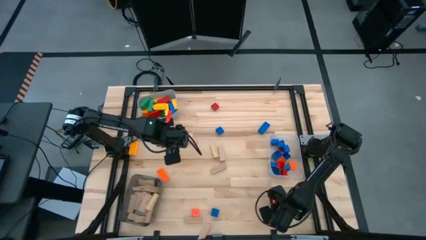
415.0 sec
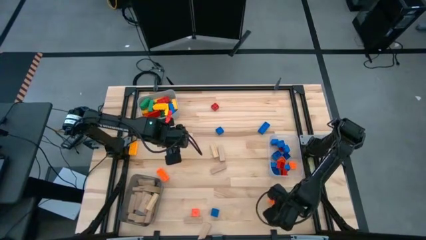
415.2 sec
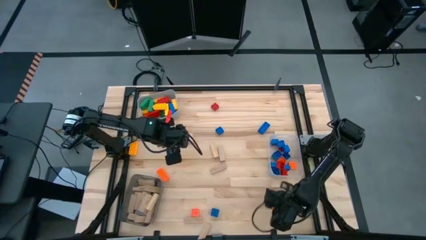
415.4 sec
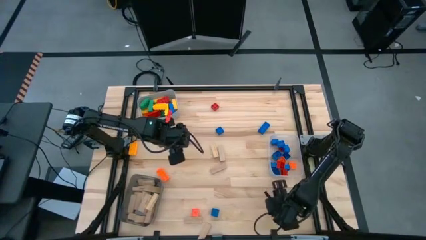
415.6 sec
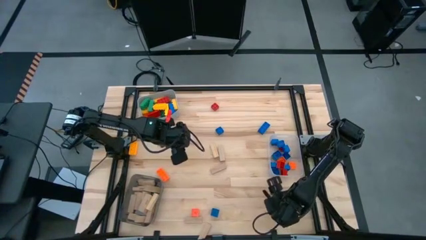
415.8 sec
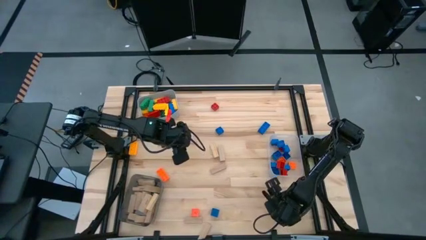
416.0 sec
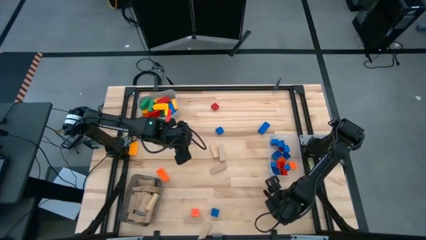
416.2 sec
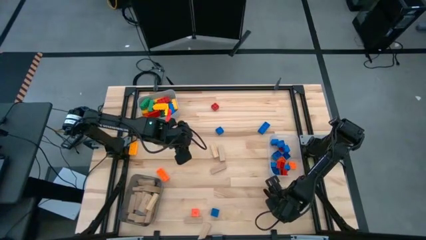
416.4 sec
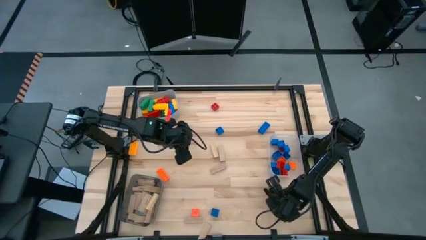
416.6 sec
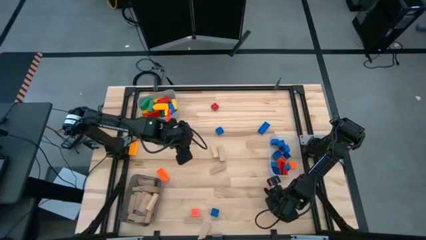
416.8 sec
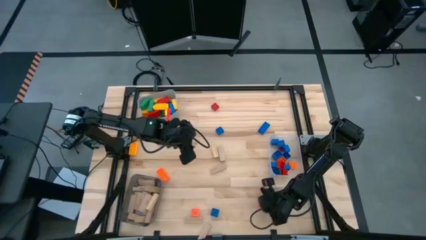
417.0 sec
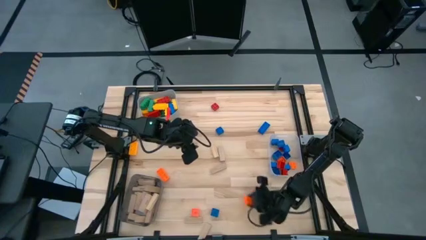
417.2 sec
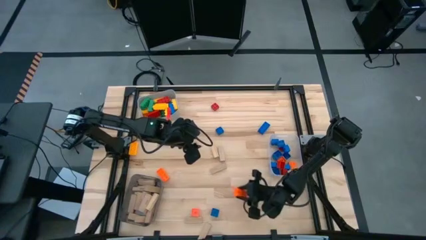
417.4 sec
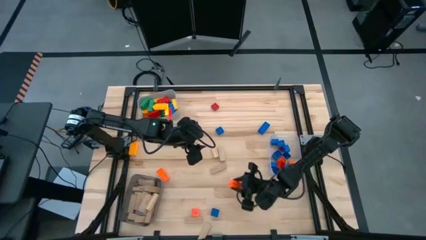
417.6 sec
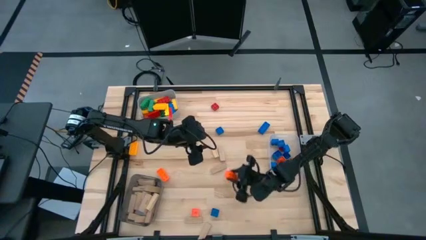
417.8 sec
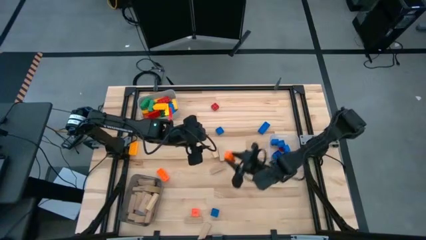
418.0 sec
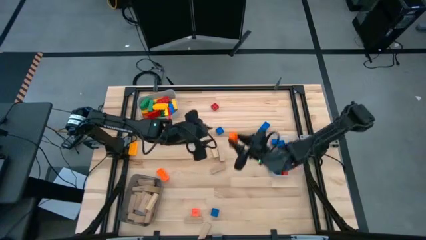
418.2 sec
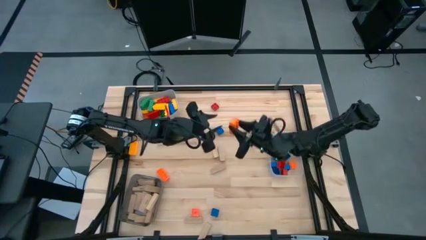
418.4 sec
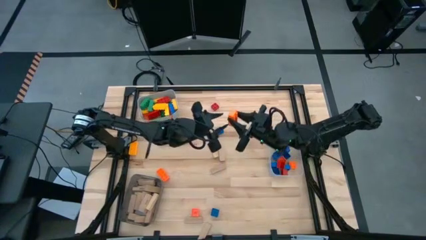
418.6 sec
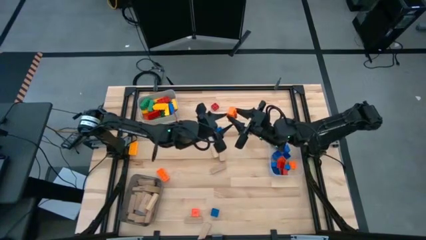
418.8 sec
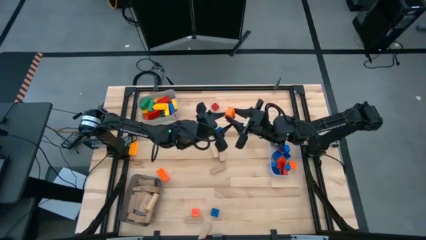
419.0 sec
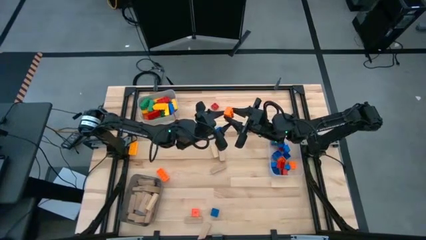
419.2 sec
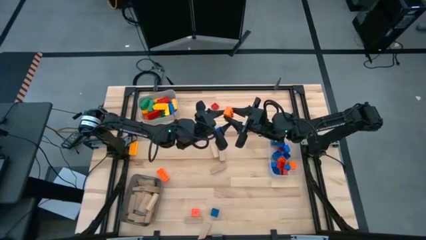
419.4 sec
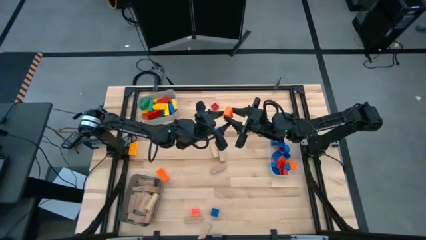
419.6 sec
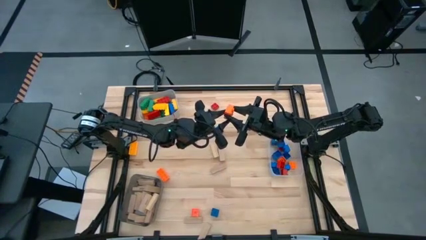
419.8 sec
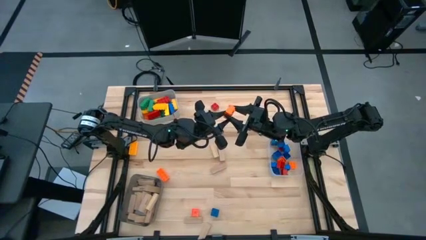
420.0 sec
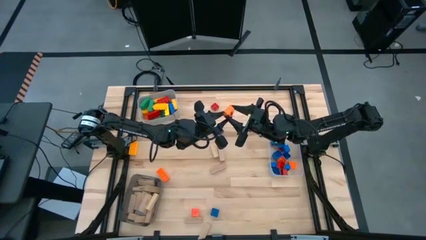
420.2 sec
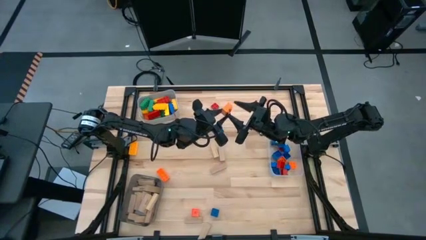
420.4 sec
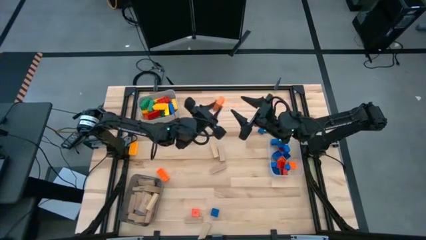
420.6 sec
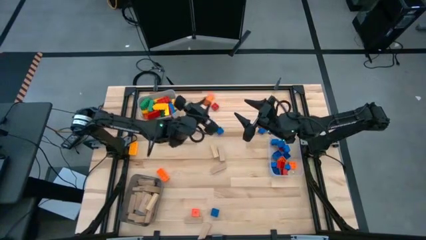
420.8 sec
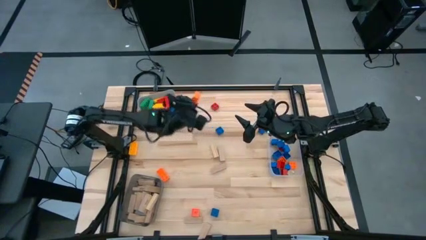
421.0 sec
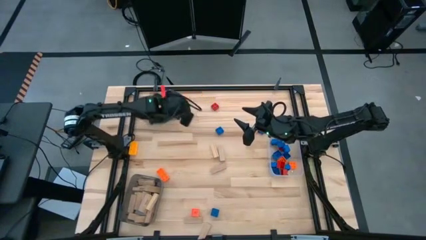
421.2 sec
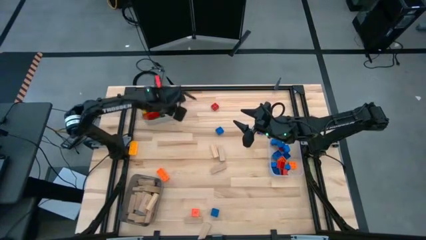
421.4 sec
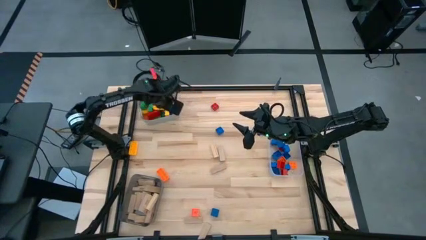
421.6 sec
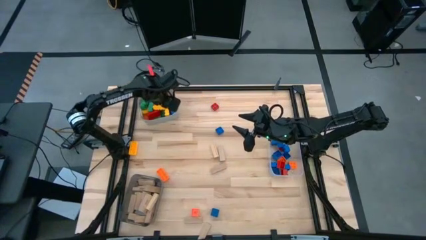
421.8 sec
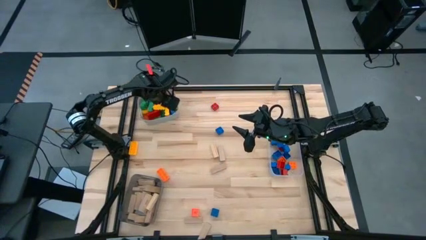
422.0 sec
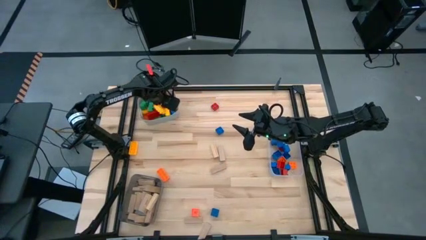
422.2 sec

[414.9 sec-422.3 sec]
Task: Sort blocks by size
Put the large orange game piece into the gray bin

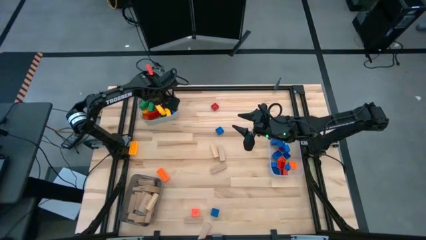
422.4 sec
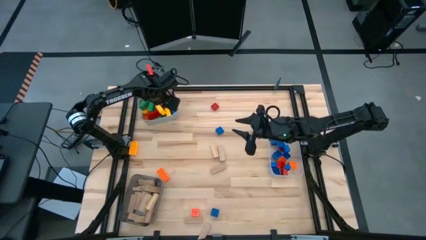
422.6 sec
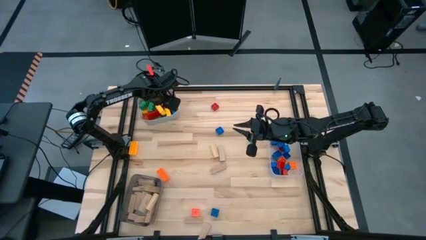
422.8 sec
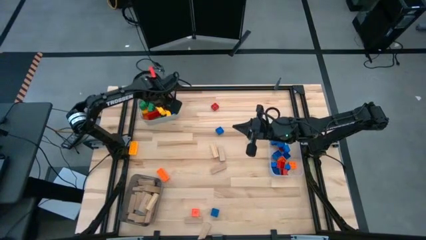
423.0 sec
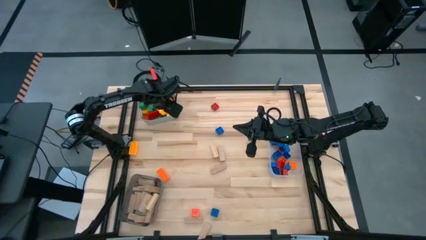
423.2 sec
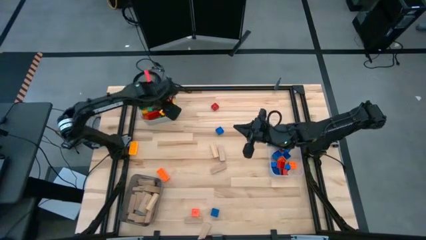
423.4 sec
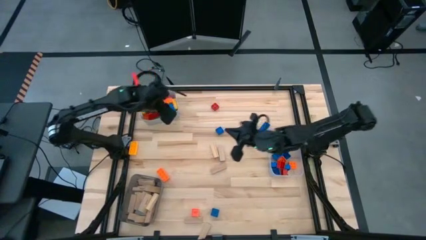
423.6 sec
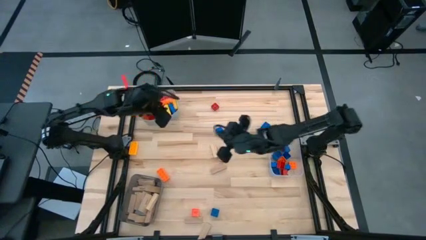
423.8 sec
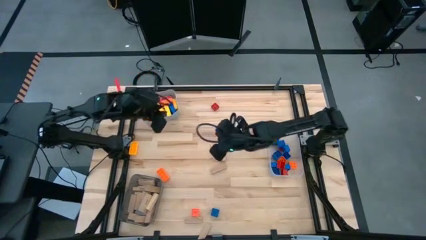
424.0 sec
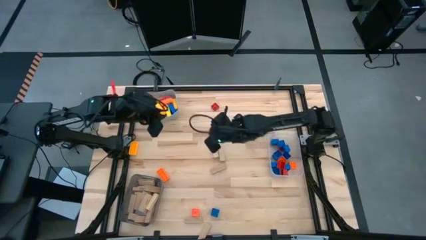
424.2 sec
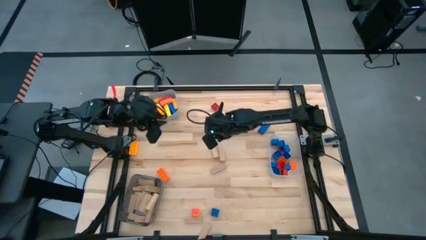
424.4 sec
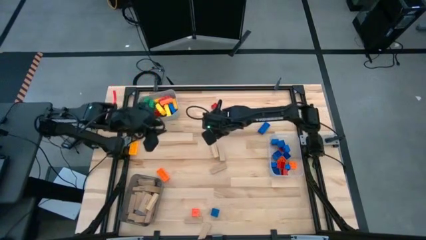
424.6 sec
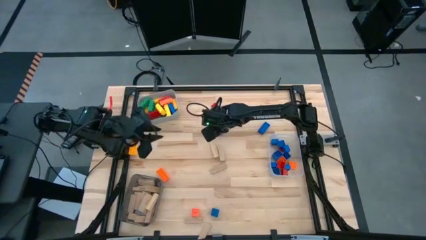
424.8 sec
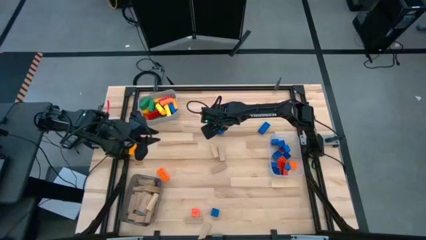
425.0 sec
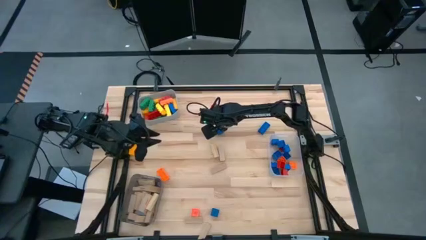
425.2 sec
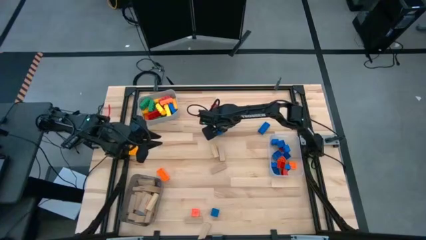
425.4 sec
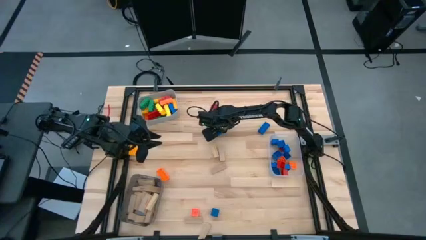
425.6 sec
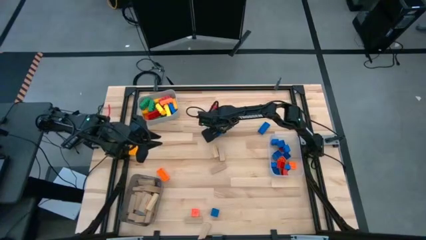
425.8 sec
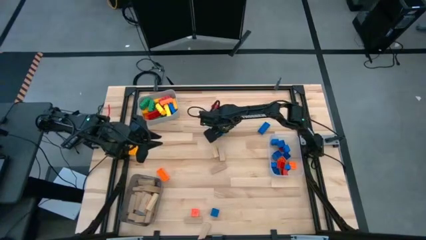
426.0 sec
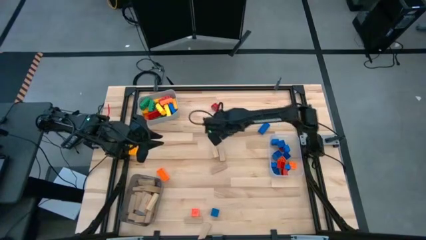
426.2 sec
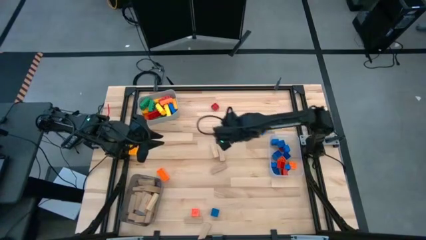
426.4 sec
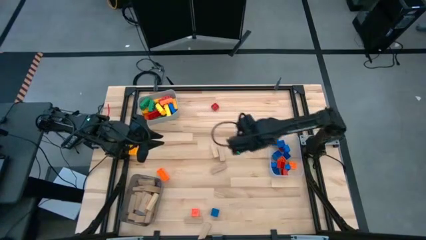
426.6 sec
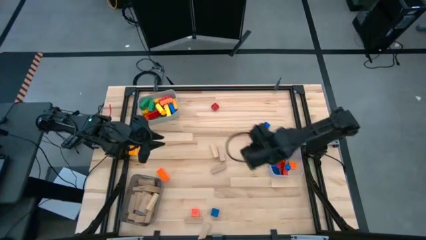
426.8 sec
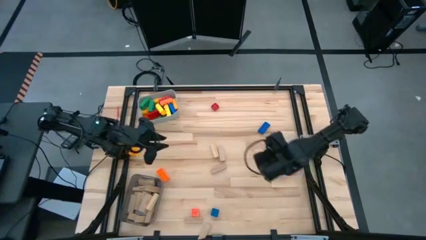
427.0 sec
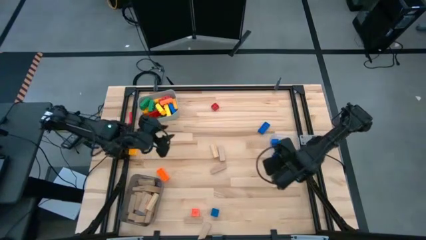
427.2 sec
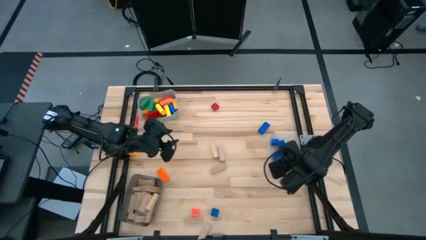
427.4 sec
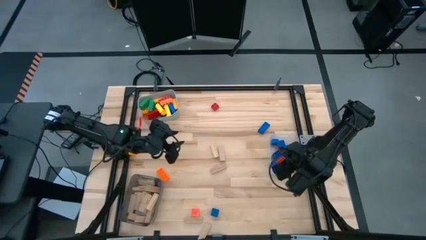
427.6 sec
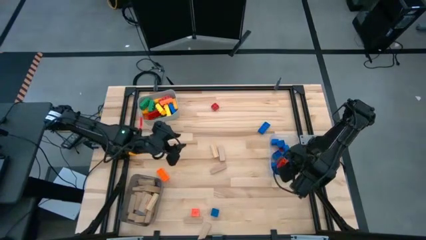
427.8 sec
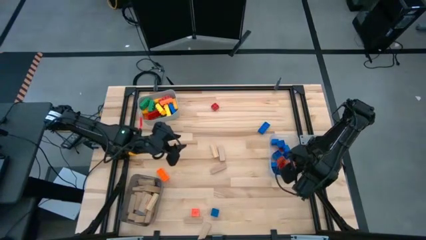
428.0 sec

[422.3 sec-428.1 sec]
Put the small blue game piece into the transparent bin

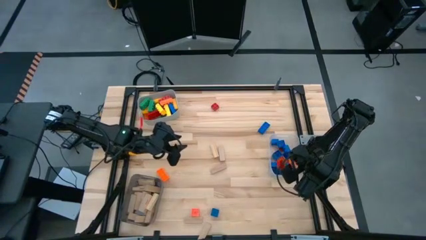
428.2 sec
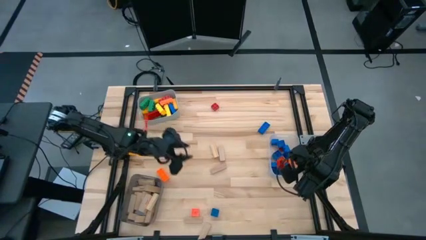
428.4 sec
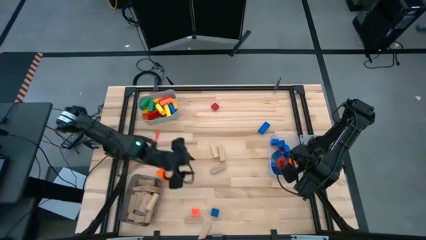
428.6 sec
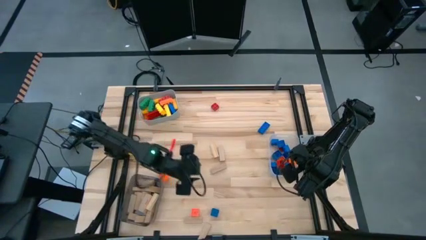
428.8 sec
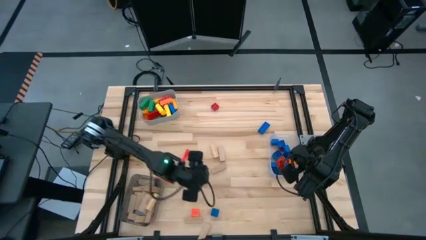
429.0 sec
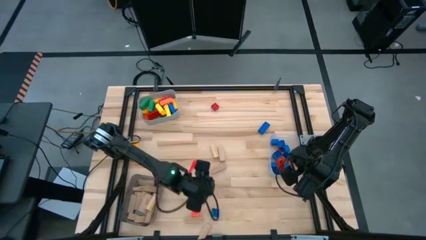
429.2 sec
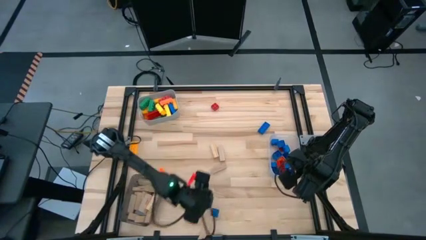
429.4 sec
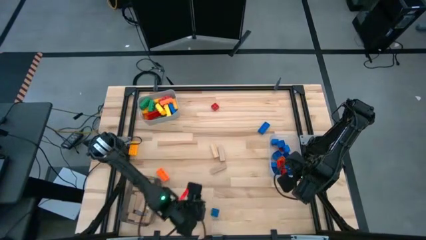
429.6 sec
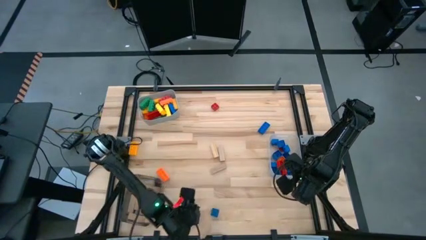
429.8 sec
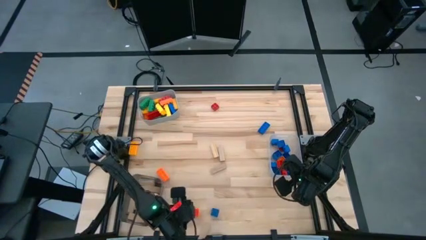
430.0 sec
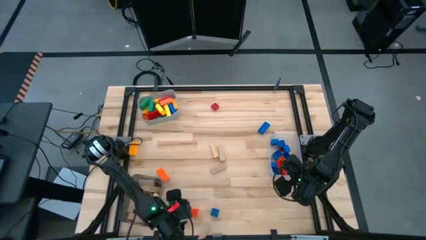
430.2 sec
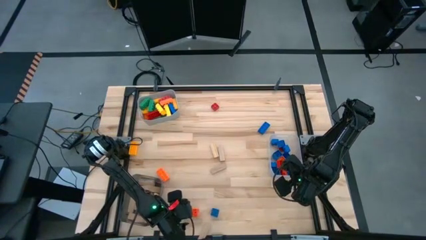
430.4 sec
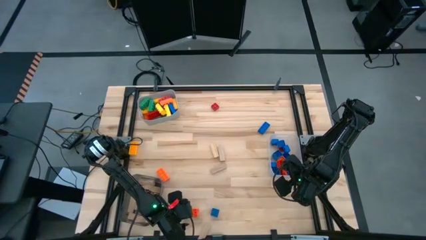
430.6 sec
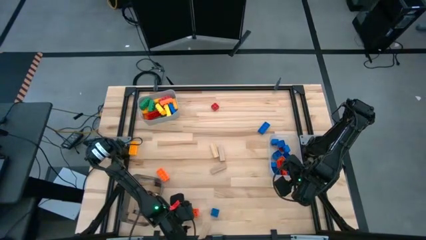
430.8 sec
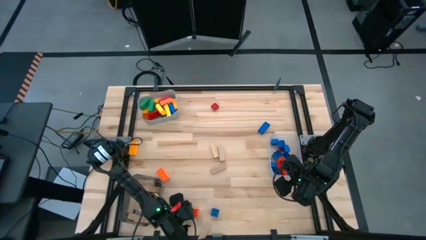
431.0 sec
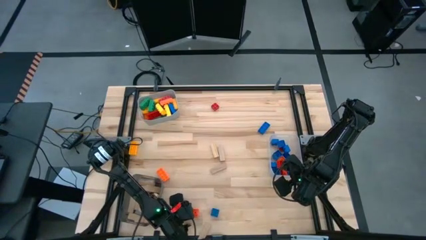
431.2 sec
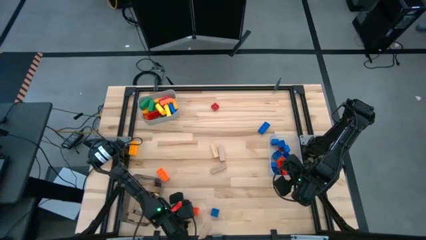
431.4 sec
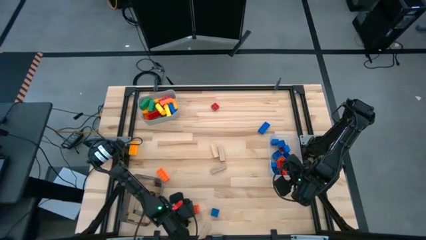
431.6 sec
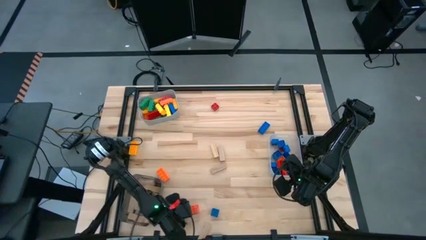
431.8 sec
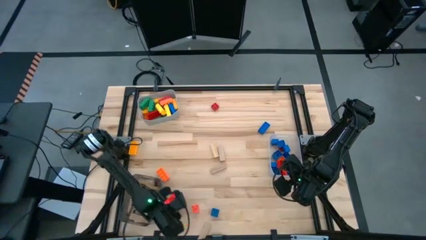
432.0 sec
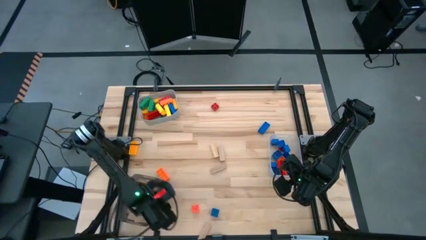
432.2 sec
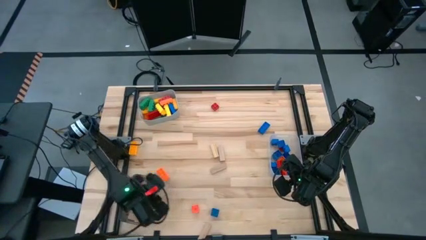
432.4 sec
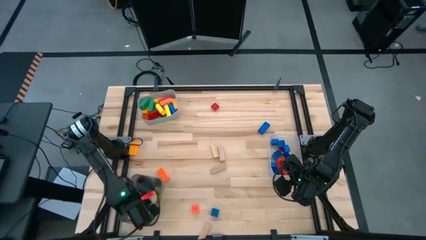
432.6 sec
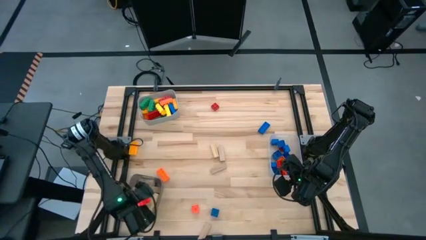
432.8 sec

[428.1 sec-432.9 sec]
Put the brown block into the black bin
